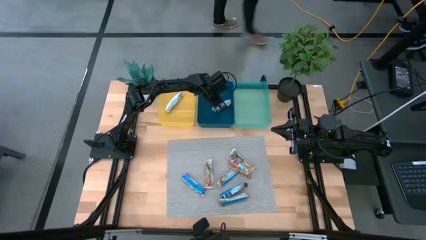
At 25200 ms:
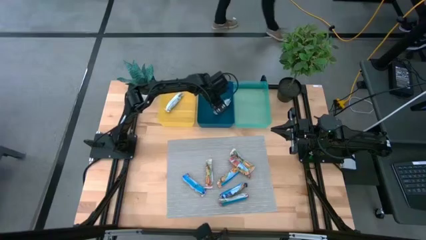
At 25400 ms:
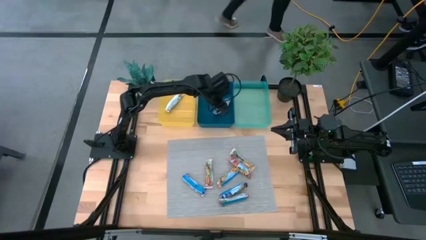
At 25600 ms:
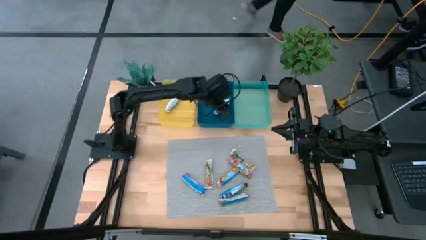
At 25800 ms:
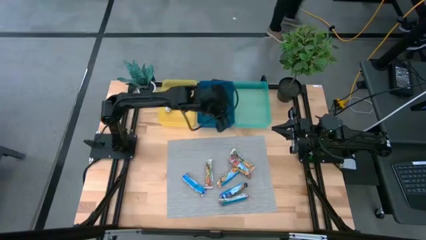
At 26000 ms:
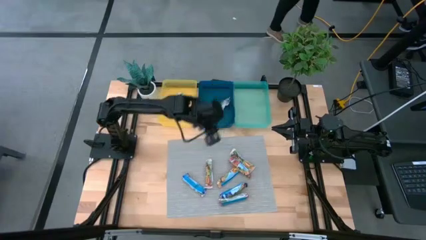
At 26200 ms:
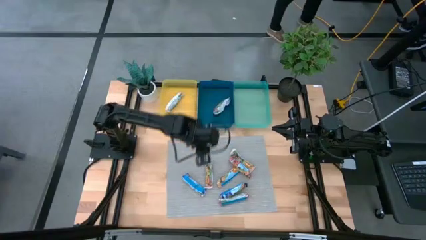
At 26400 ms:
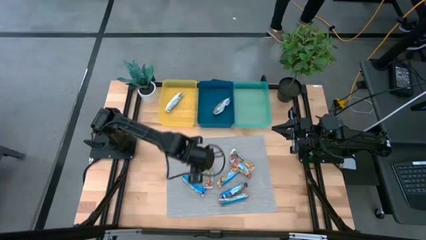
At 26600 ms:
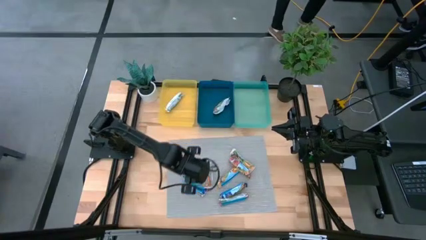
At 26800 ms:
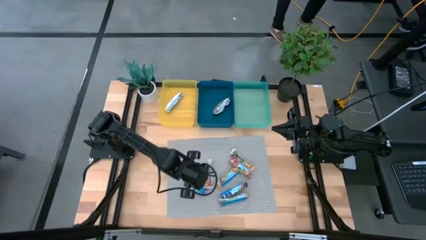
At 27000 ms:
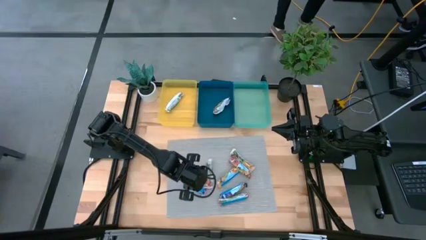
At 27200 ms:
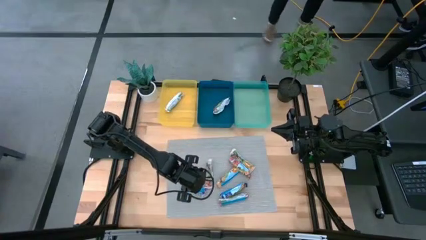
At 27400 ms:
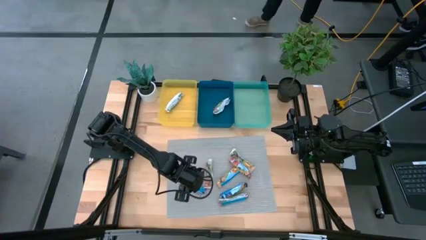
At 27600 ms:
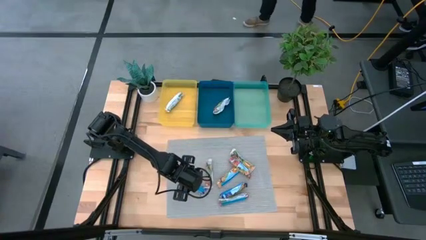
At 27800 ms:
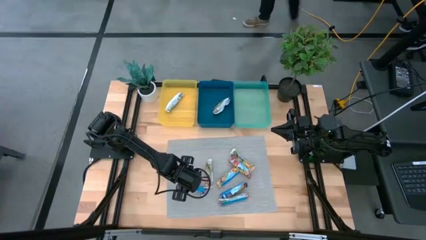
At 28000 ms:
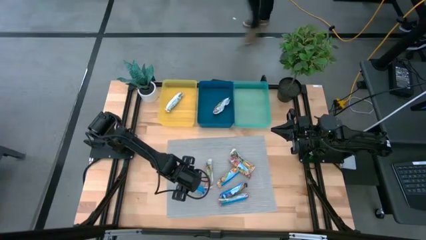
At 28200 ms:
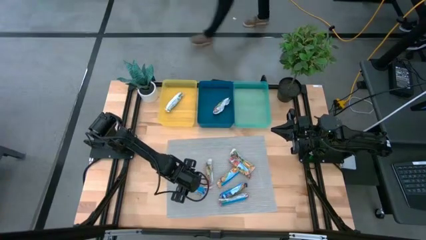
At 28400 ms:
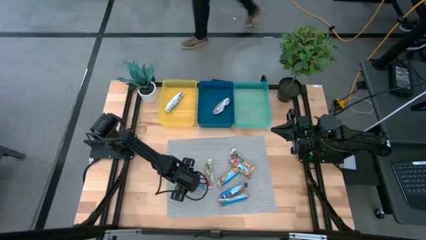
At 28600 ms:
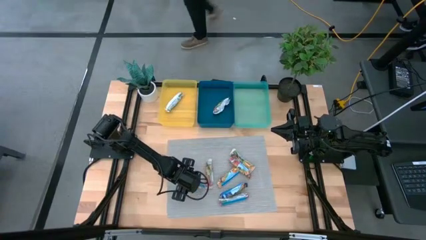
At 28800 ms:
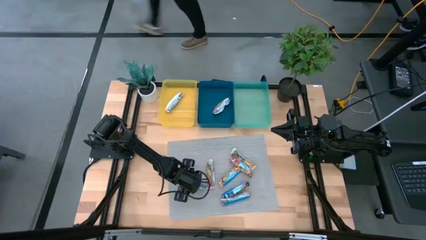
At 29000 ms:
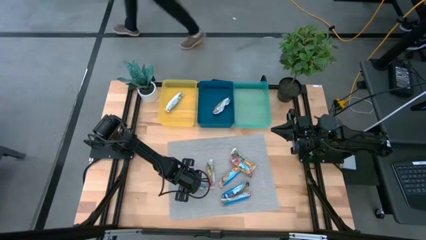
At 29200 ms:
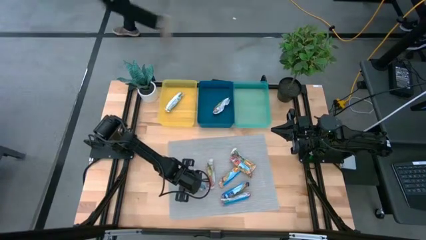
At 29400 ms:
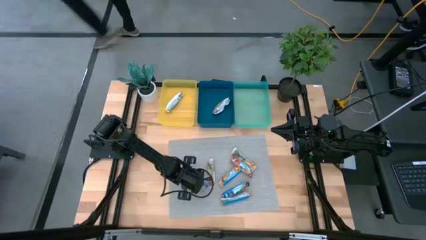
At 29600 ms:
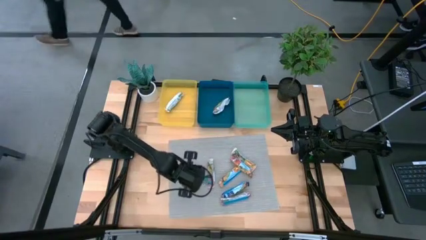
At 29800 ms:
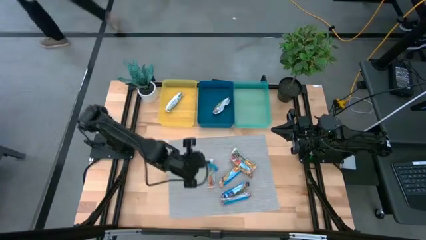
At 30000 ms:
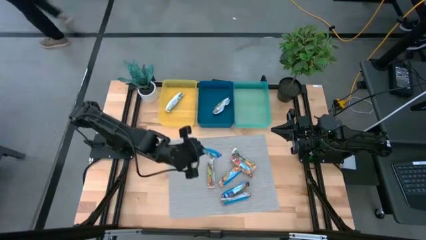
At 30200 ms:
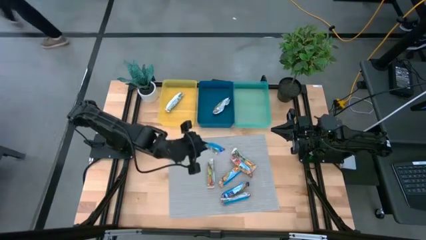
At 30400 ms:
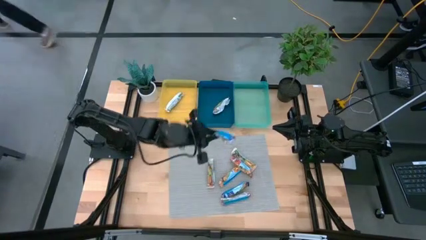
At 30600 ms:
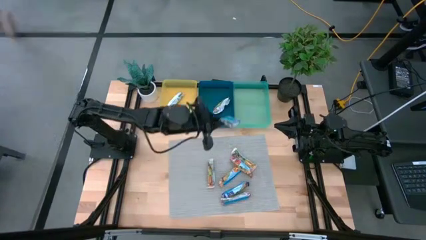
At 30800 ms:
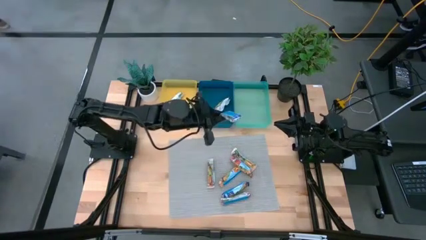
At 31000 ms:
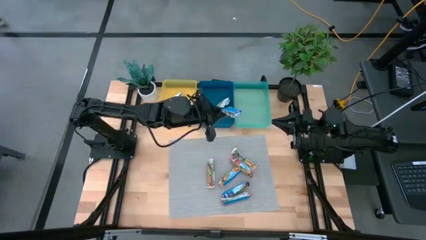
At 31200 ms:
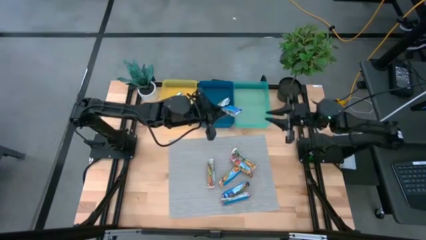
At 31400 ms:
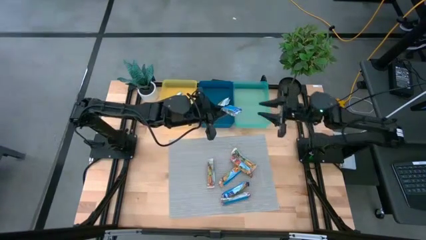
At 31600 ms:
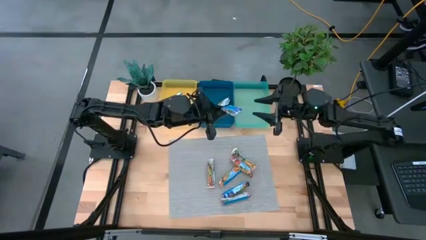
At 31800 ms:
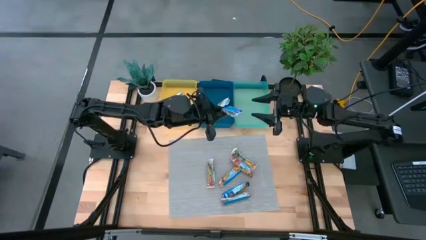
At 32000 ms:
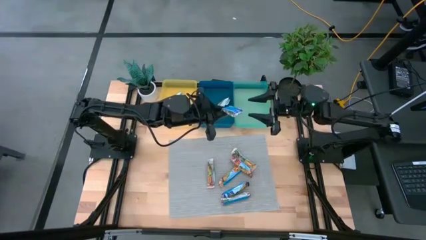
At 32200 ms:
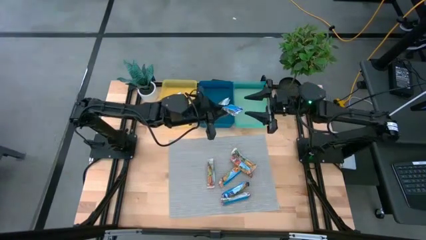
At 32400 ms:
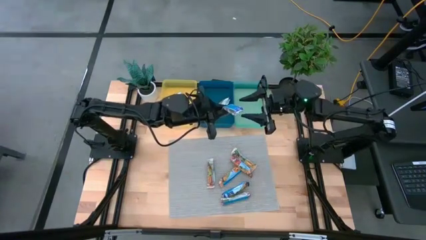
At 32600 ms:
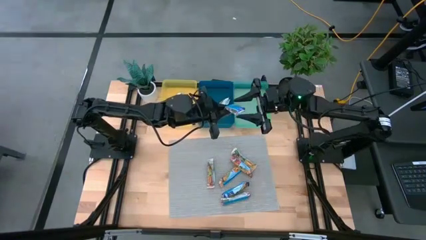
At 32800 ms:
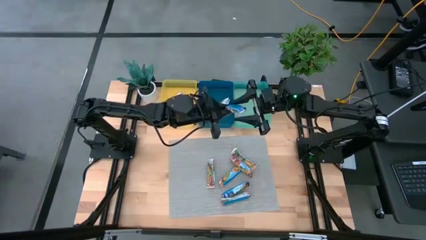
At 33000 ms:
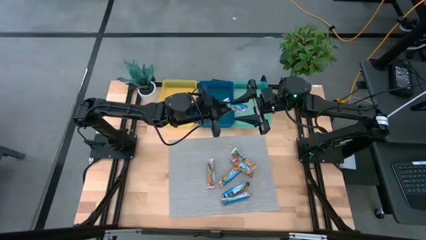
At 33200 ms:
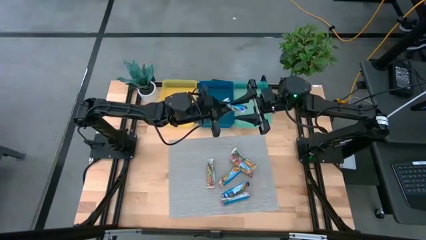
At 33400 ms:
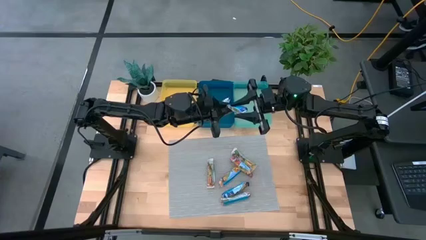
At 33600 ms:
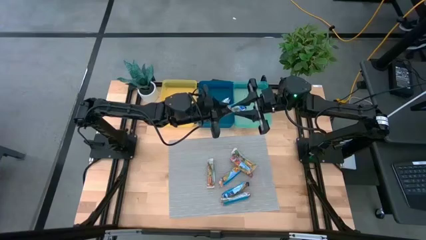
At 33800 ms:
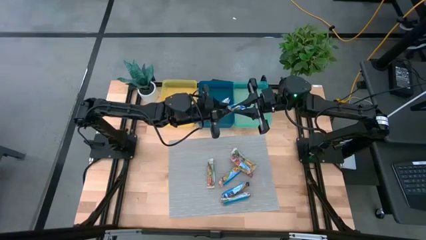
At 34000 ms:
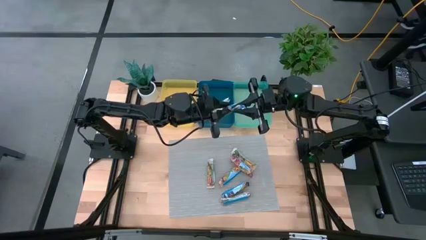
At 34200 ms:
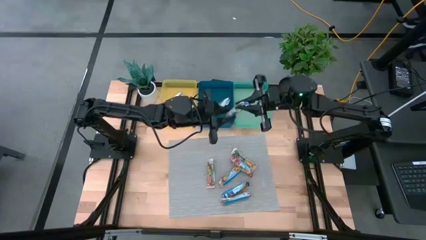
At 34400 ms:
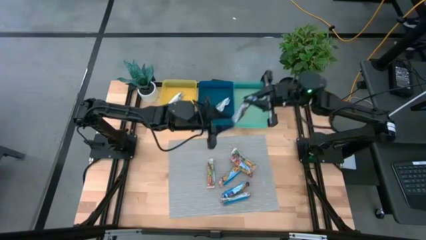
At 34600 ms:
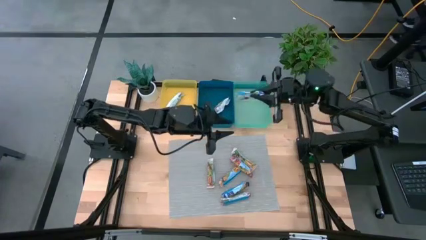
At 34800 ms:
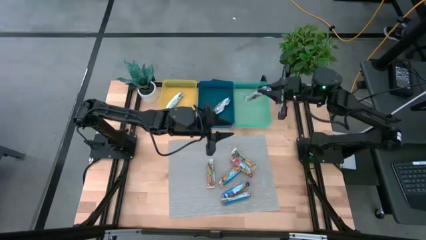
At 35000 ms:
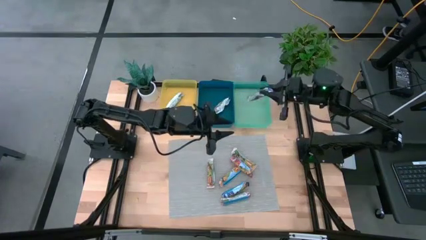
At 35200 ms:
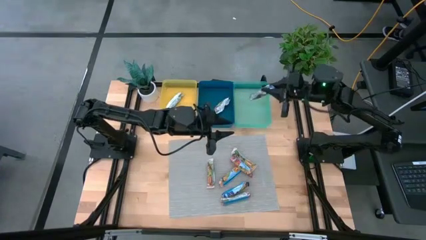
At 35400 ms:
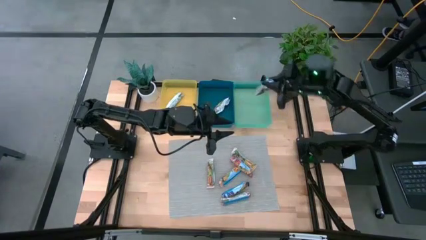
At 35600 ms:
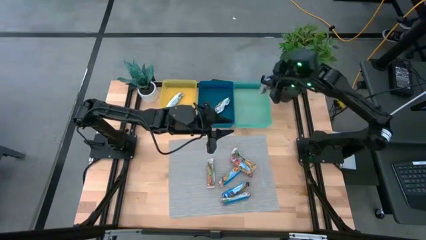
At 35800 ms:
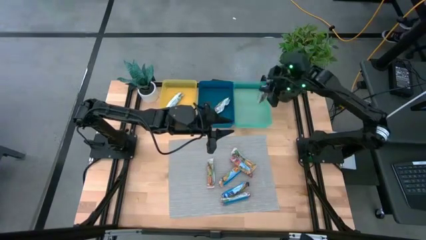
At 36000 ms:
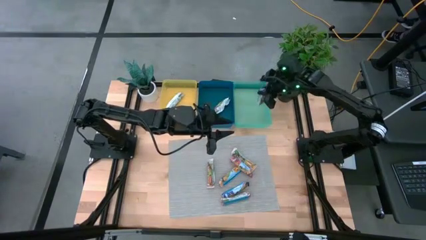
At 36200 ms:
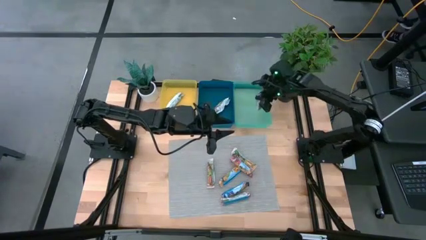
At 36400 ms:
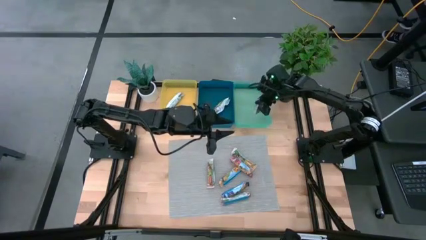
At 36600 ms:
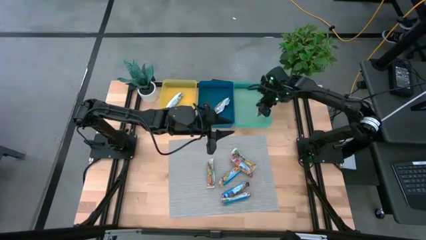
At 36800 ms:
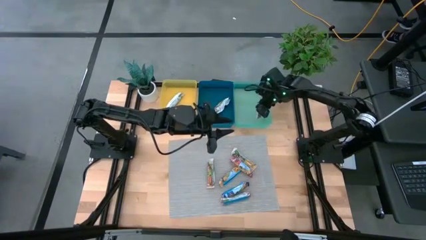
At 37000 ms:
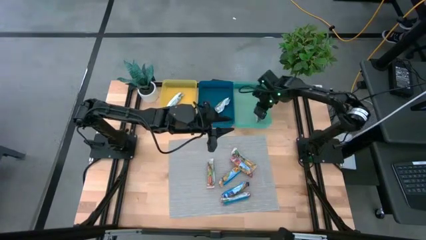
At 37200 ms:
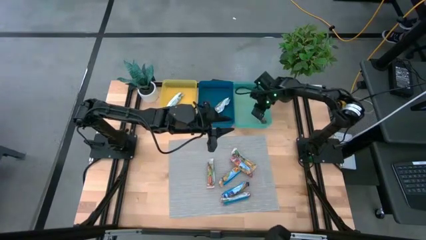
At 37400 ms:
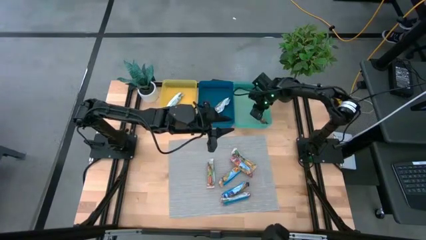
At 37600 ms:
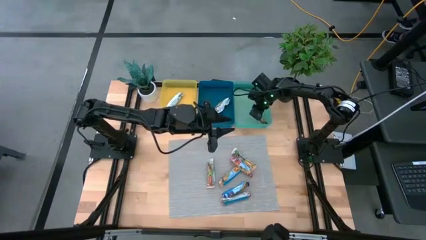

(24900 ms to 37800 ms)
Task: Pick and place Granola Bars by type
Put the violet granola bar into the green bin
